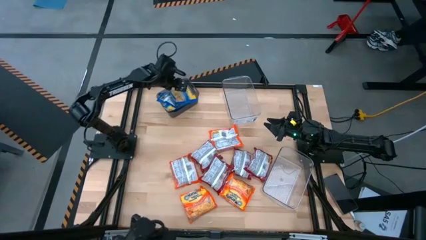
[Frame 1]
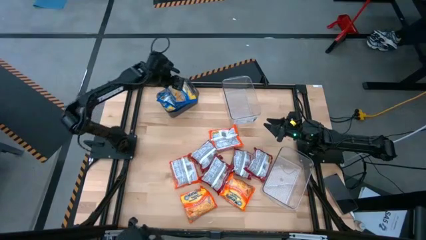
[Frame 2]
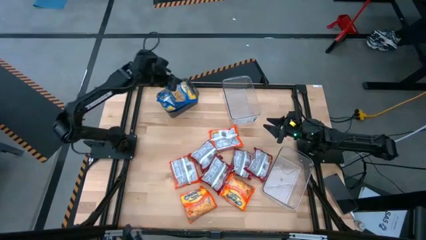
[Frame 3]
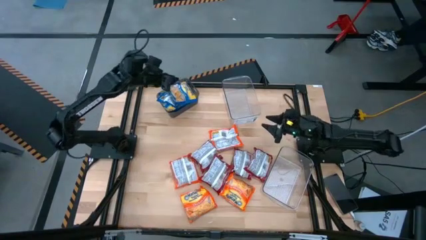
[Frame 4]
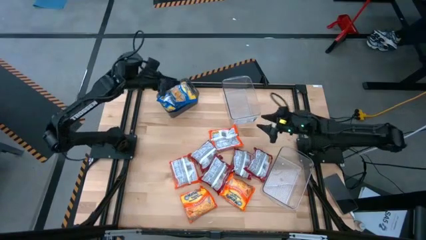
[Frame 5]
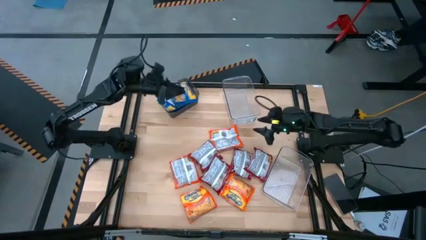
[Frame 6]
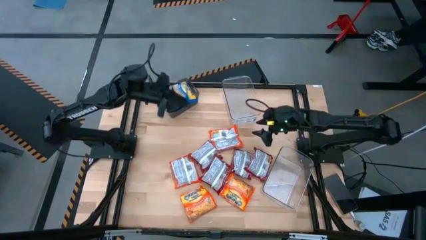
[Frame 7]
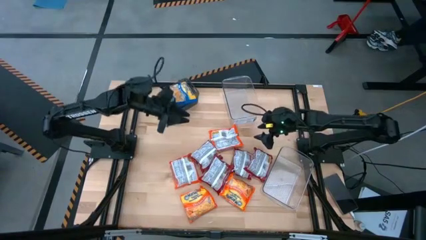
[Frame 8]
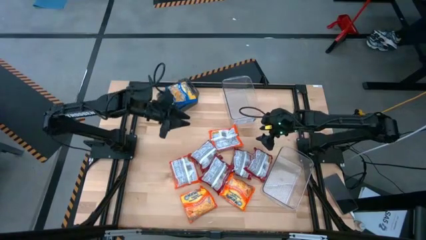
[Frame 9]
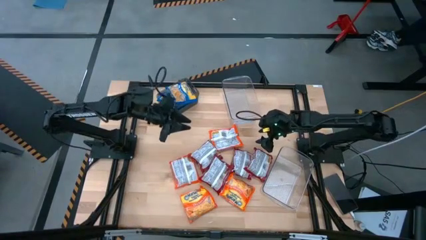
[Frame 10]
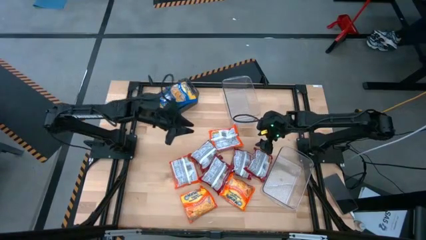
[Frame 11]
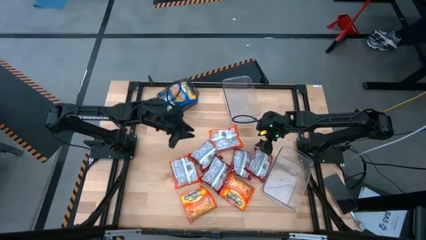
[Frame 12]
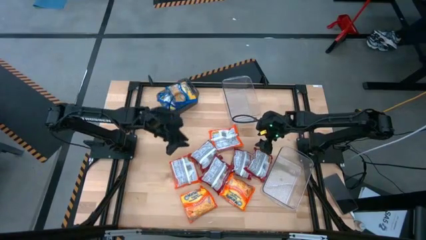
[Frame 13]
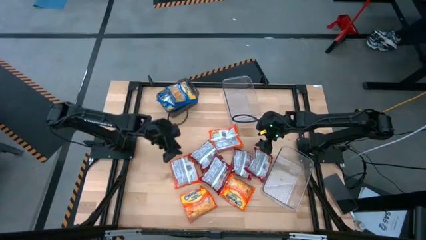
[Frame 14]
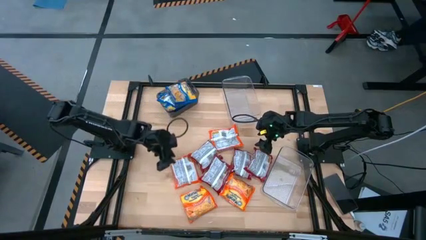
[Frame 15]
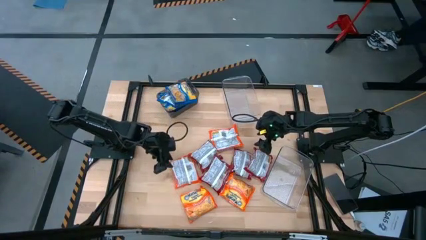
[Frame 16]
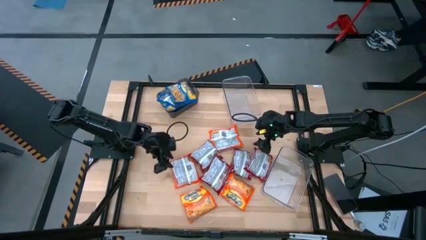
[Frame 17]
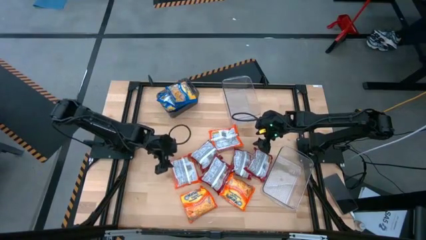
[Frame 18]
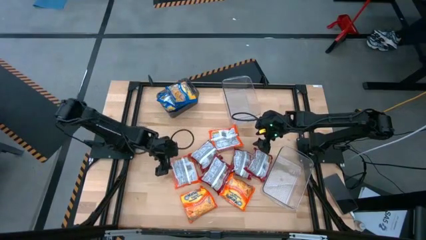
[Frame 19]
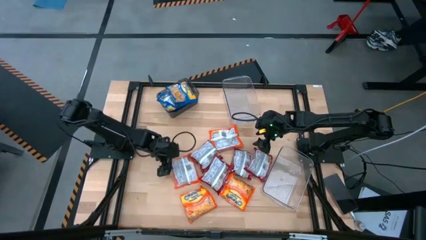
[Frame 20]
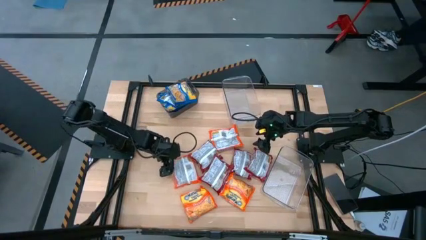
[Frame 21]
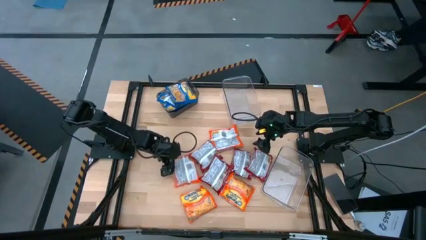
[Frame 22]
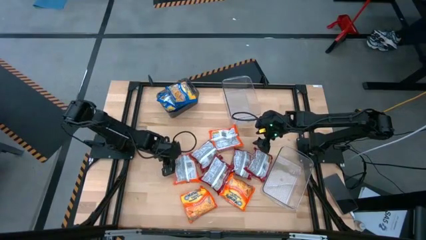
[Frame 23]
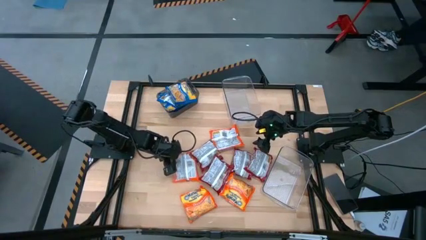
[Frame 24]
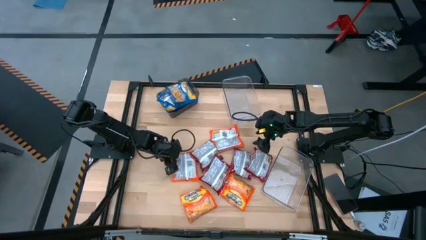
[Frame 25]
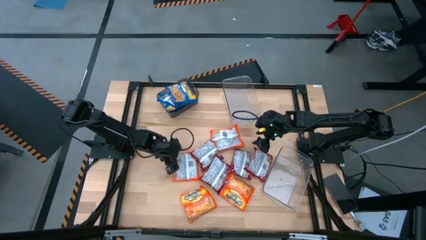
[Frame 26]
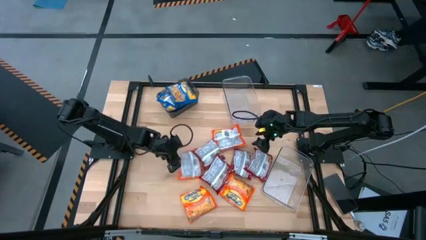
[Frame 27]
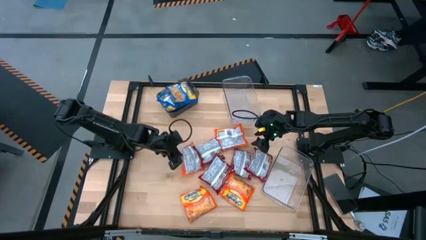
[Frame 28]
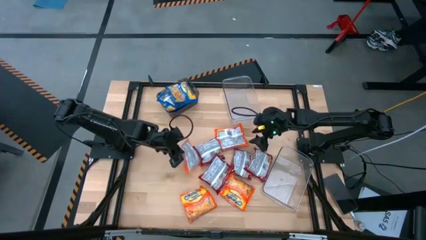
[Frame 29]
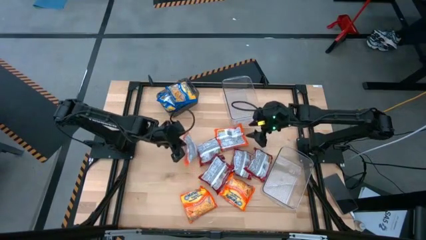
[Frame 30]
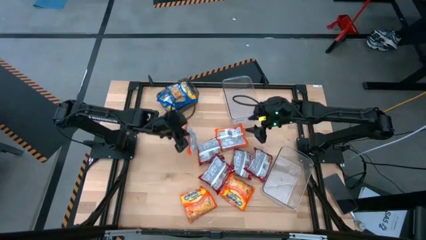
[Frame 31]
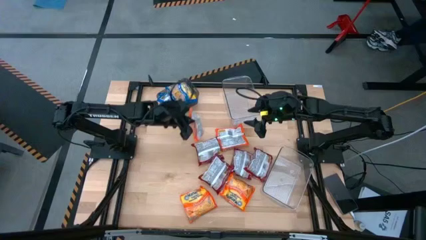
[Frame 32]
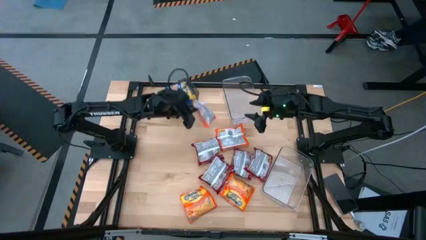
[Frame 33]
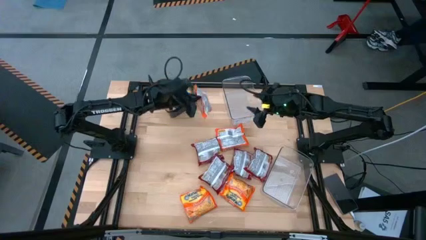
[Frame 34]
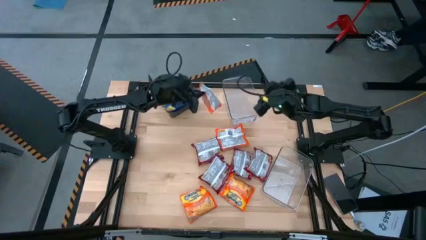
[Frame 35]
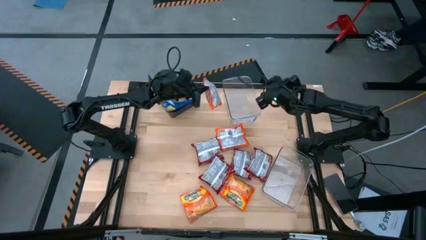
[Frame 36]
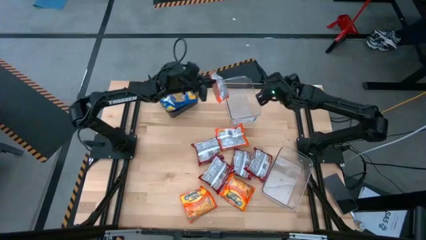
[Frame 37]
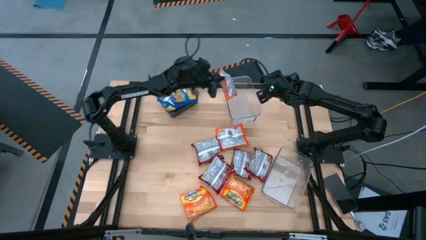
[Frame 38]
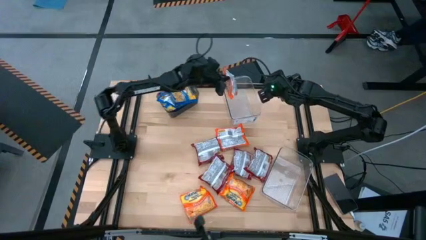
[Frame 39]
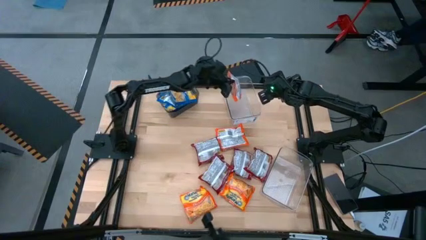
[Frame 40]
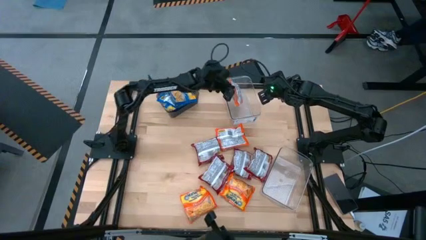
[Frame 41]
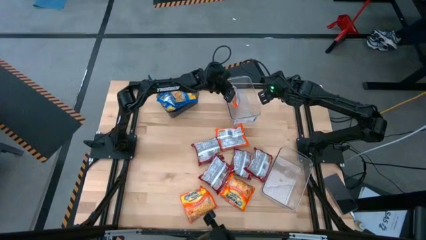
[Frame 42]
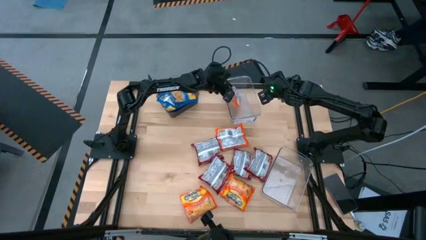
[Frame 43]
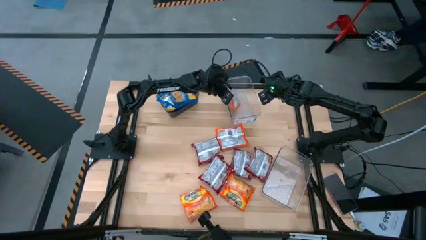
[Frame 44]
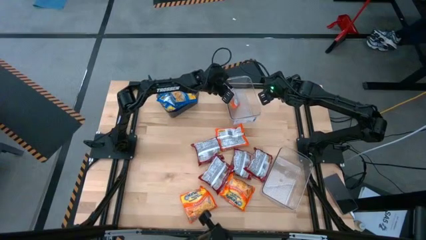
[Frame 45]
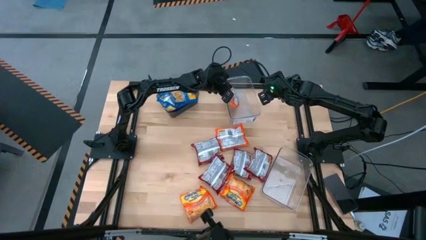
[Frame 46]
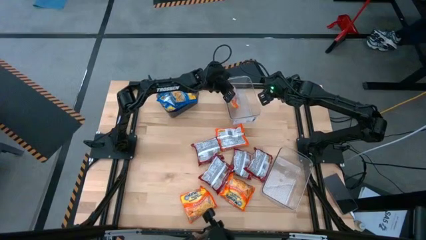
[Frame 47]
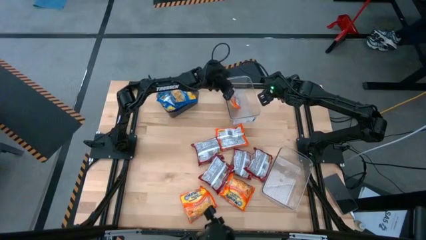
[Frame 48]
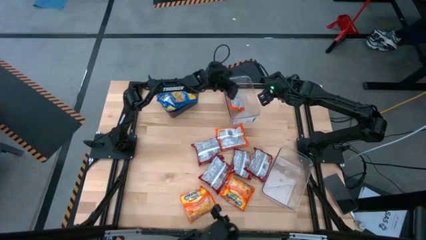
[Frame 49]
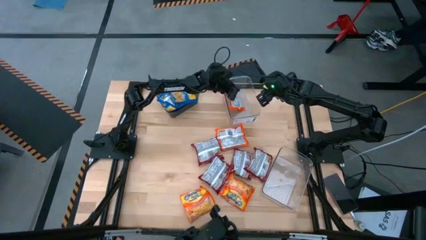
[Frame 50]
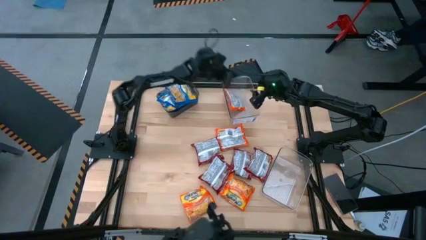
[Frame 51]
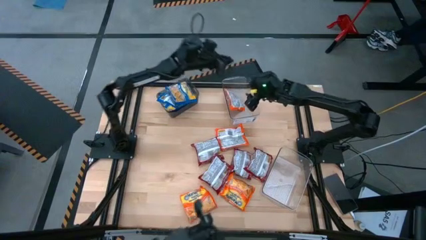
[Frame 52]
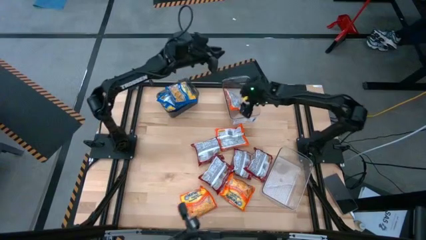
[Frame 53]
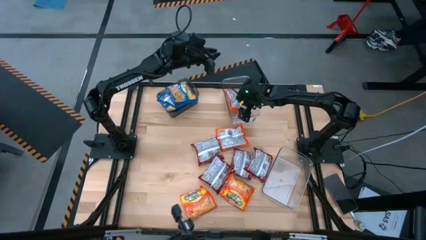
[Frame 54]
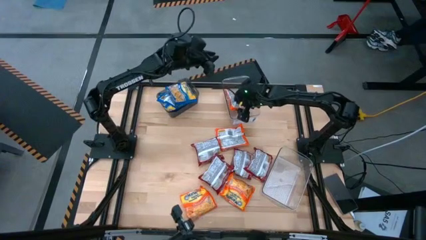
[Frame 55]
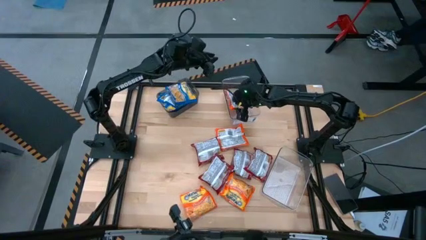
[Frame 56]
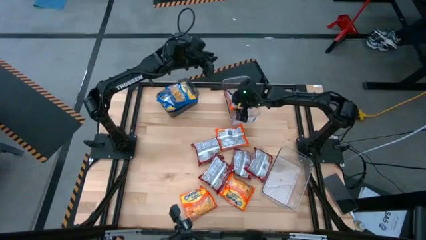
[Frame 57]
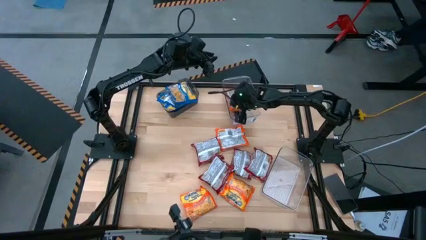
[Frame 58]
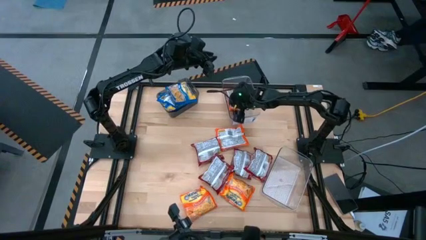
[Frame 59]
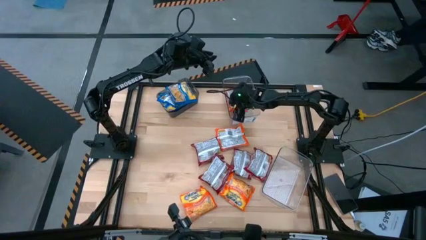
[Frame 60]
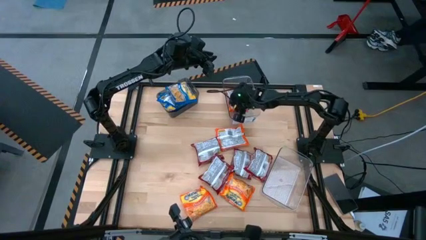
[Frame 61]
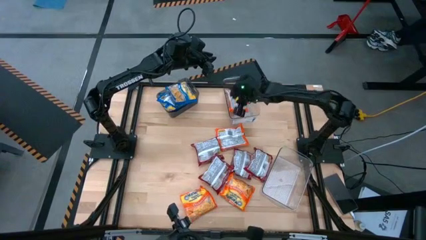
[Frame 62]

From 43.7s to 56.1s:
Task: Sort Maruchan noodles
Put the orange noodle pack into the top transparent bin

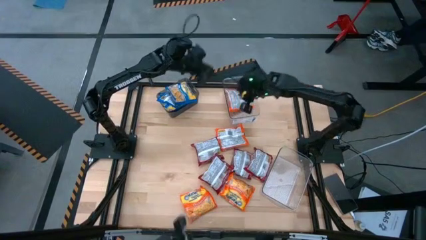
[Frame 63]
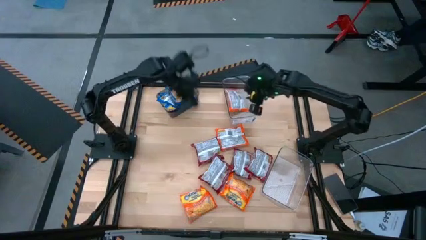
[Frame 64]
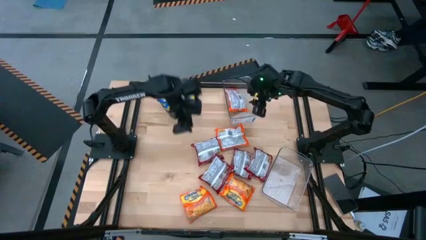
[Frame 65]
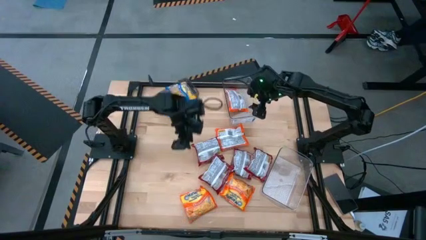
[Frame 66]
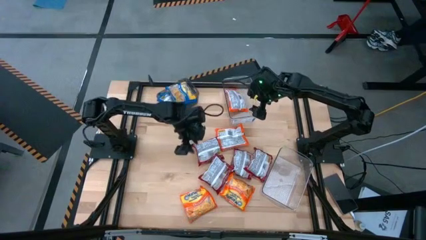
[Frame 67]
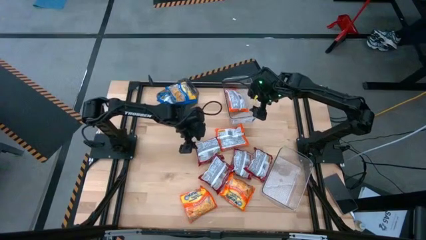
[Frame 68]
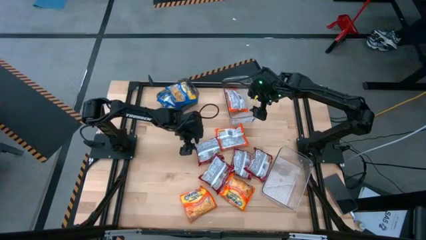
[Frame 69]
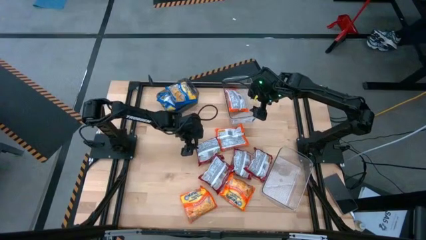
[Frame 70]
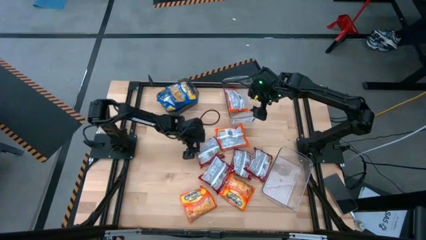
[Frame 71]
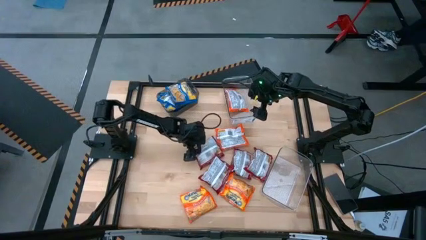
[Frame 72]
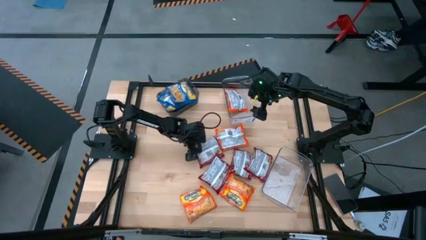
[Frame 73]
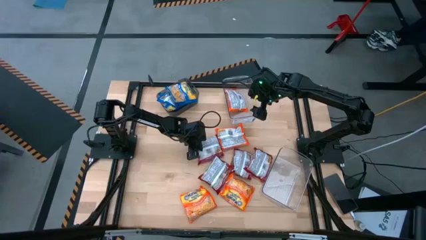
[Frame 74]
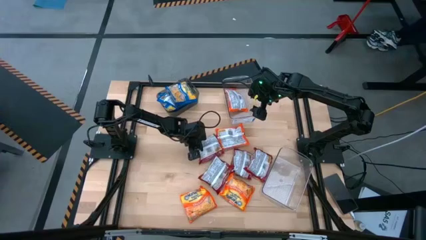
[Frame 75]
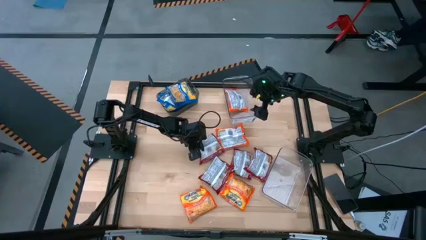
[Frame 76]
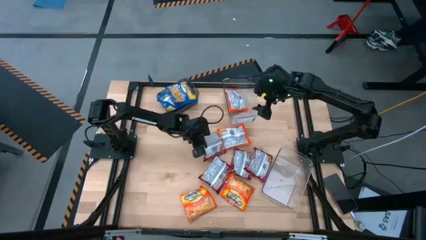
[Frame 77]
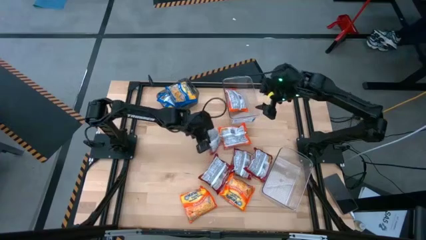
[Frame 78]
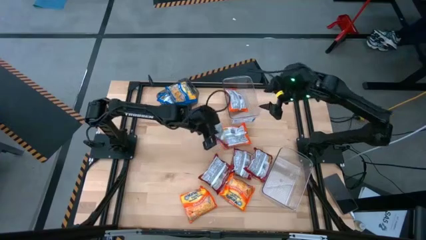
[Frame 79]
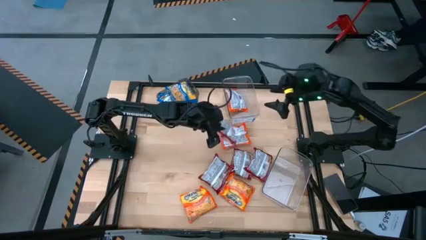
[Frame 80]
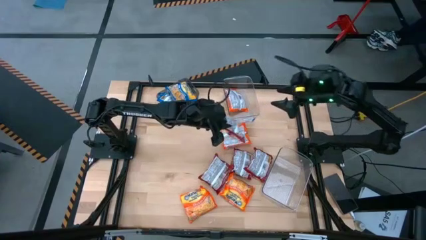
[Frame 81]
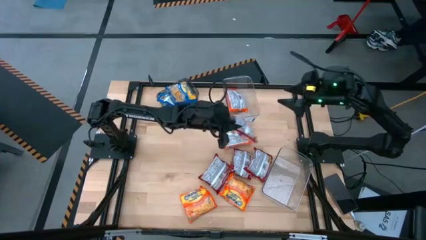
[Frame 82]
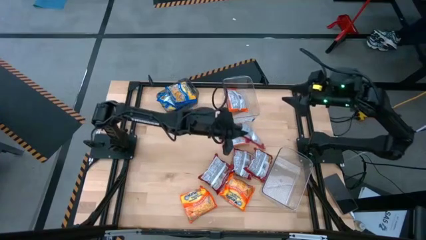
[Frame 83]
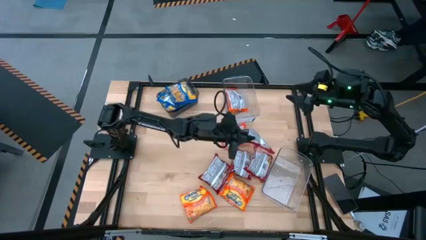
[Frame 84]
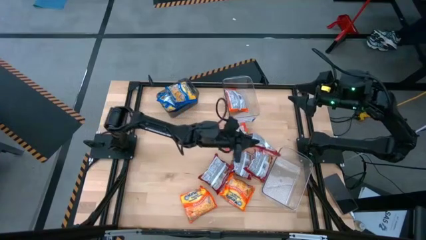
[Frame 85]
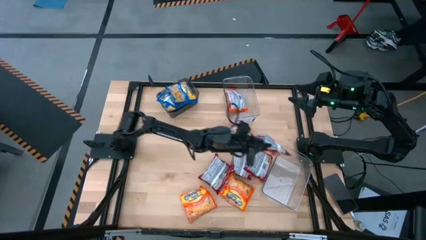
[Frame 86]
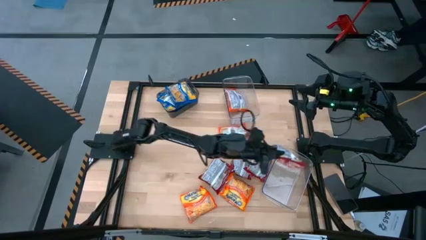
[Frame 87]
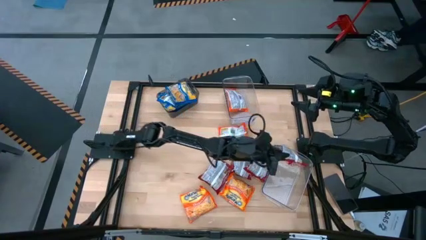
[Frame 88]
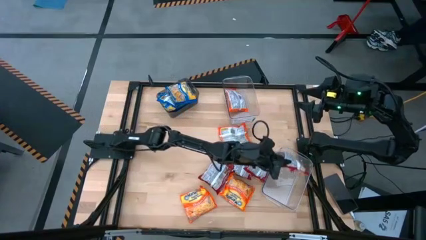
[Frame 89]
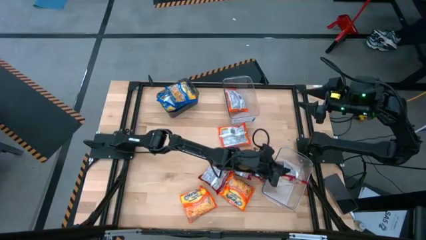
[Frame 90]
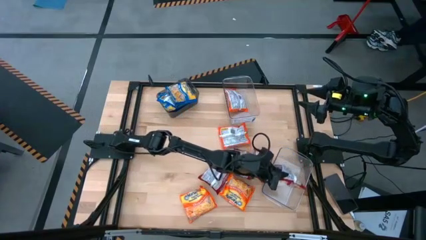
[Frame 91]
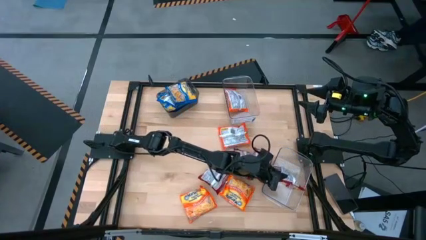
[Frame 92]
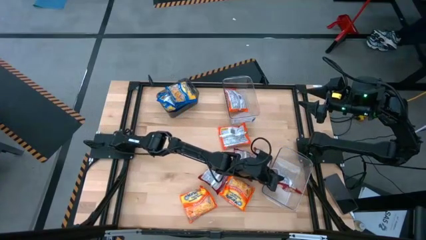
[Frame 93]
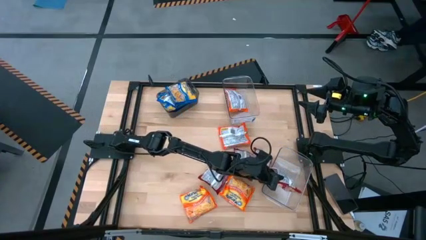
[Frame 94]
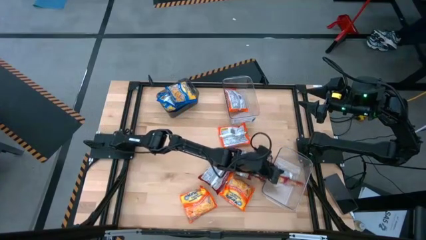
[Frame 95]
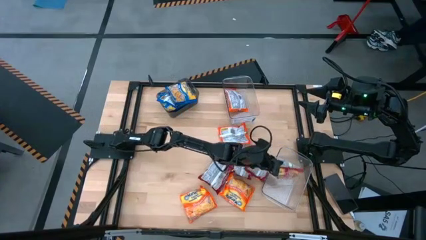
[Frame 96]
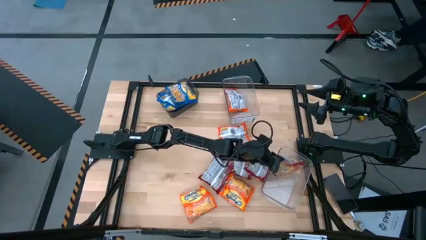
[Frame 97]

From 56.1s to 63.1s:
Put the red noodle pack into the bottom transparent bin
